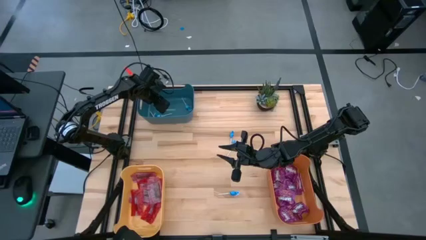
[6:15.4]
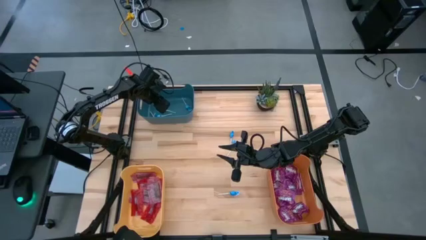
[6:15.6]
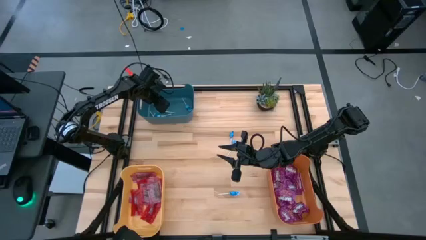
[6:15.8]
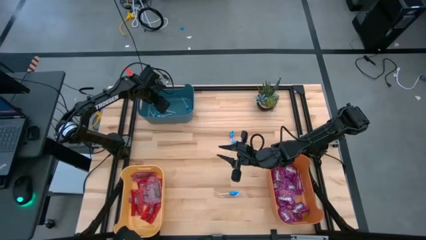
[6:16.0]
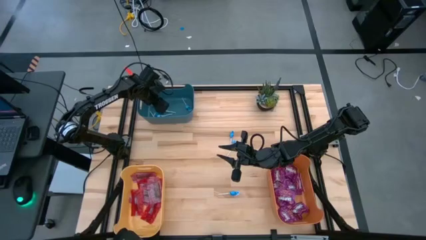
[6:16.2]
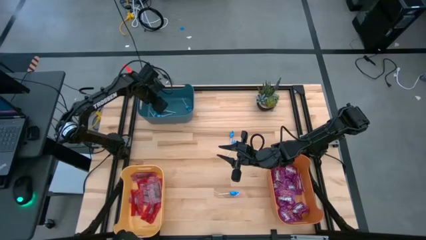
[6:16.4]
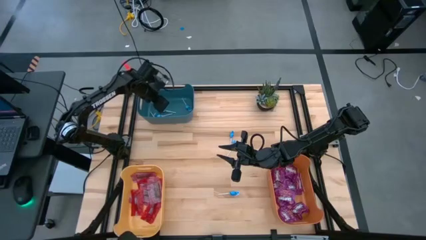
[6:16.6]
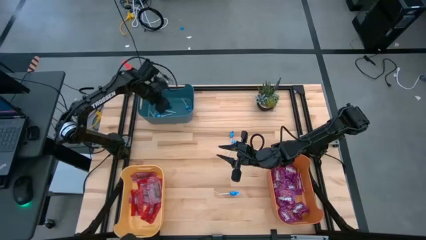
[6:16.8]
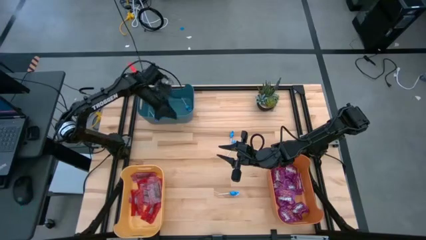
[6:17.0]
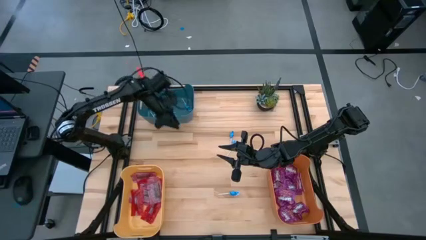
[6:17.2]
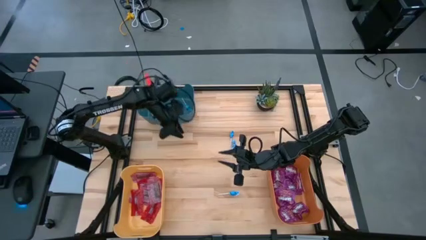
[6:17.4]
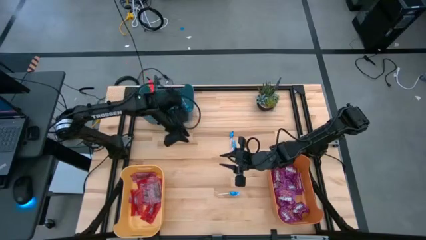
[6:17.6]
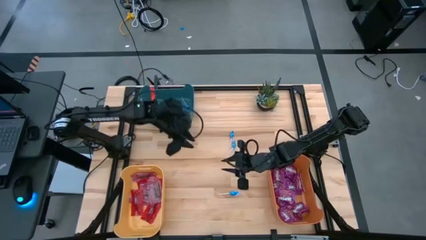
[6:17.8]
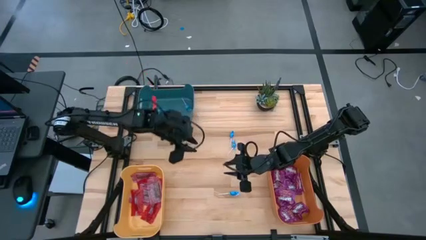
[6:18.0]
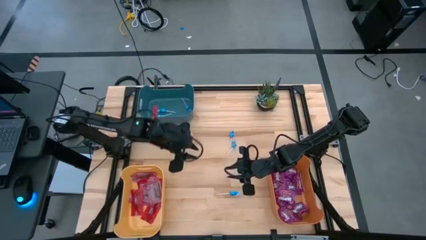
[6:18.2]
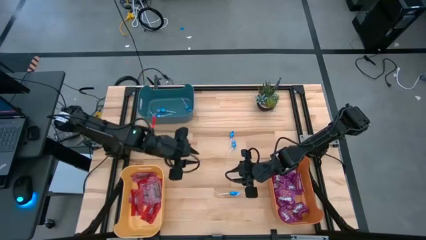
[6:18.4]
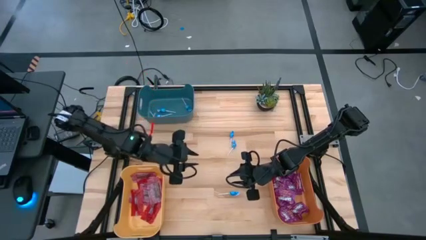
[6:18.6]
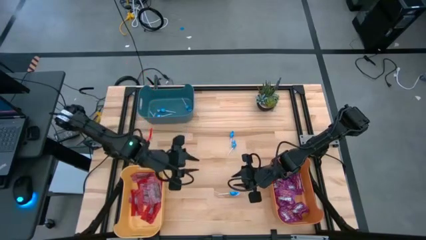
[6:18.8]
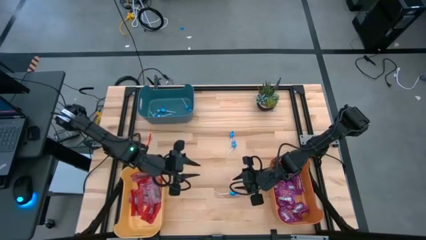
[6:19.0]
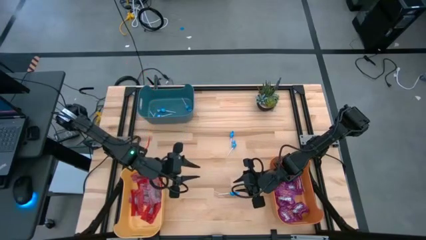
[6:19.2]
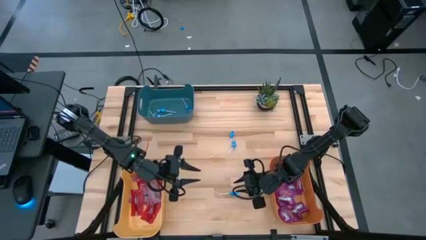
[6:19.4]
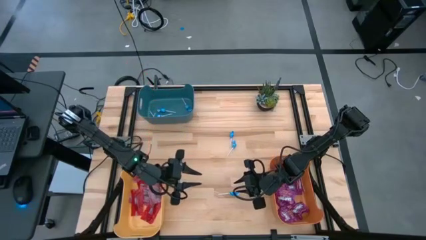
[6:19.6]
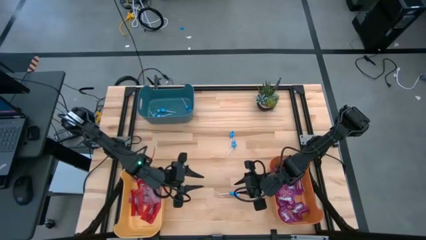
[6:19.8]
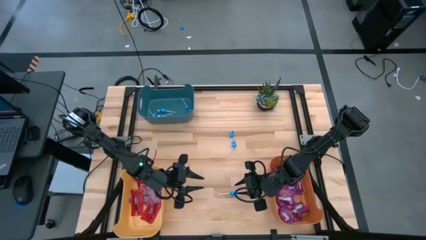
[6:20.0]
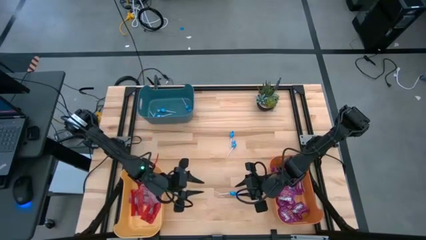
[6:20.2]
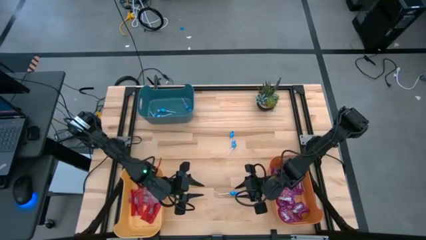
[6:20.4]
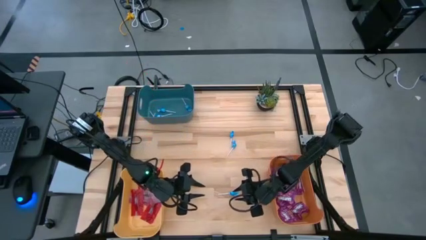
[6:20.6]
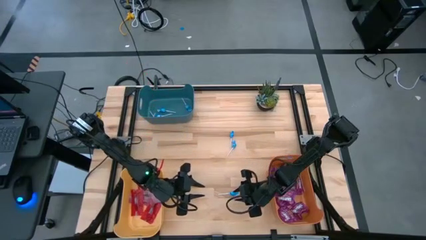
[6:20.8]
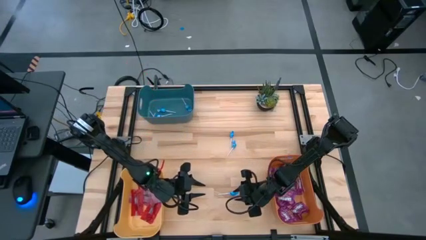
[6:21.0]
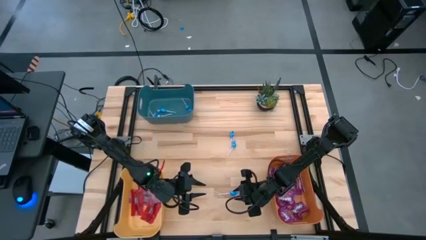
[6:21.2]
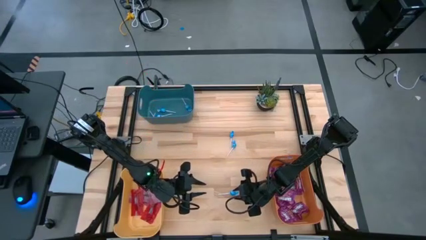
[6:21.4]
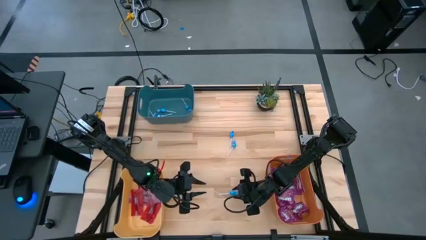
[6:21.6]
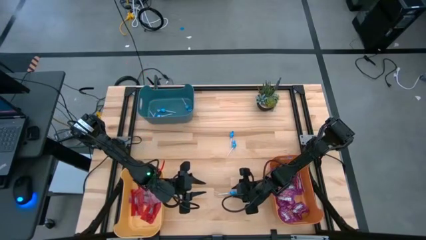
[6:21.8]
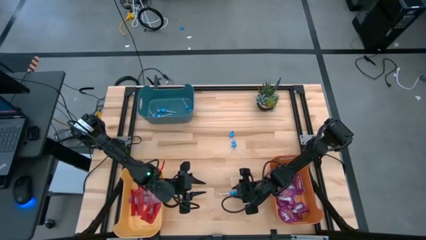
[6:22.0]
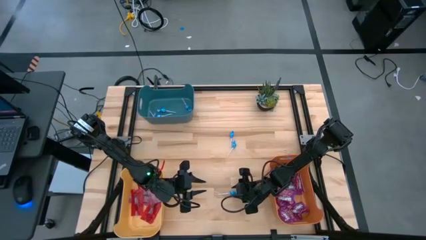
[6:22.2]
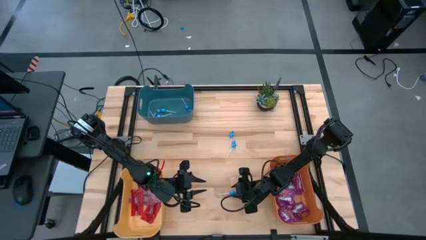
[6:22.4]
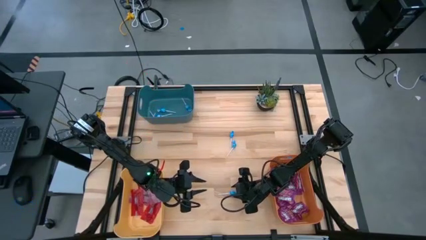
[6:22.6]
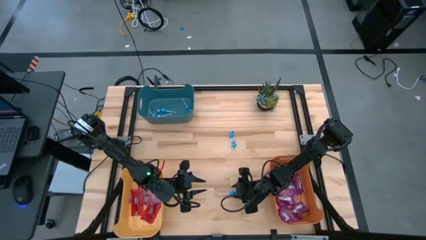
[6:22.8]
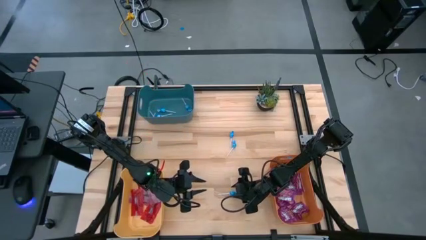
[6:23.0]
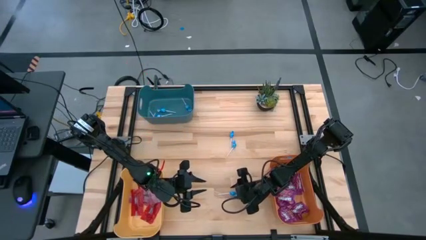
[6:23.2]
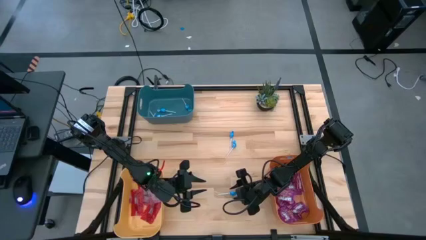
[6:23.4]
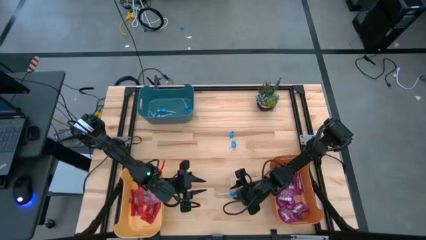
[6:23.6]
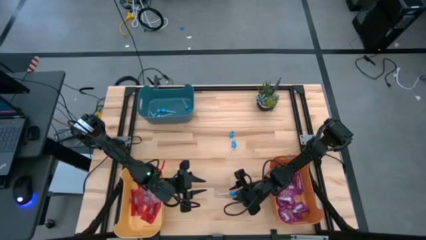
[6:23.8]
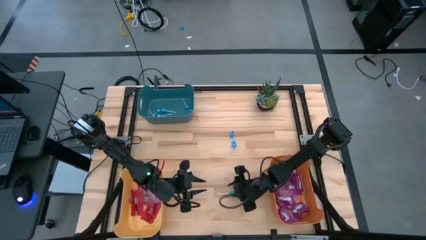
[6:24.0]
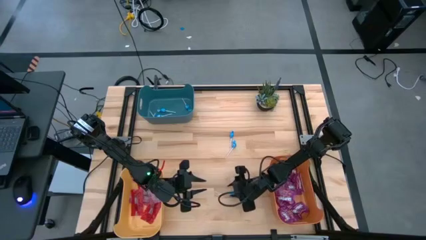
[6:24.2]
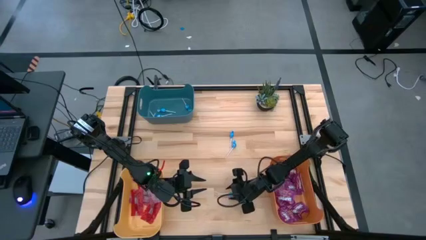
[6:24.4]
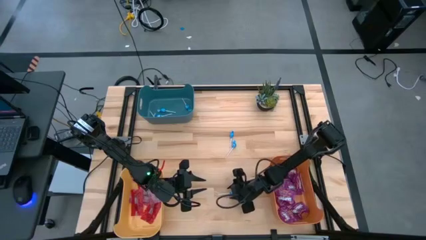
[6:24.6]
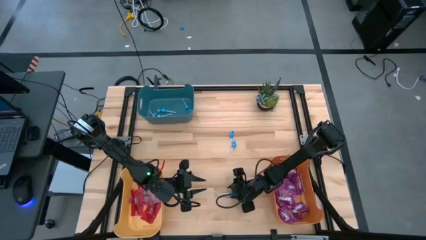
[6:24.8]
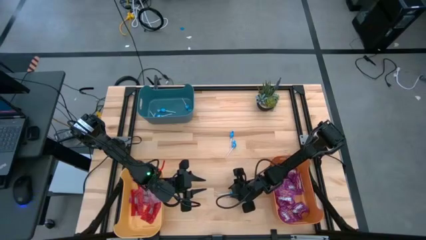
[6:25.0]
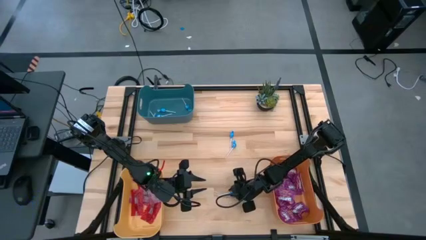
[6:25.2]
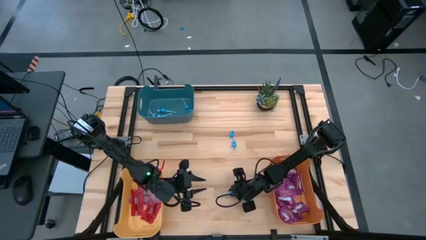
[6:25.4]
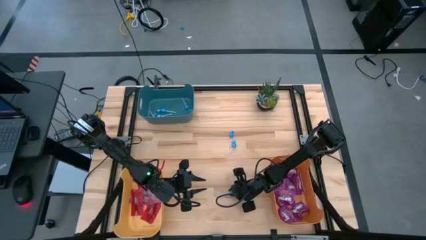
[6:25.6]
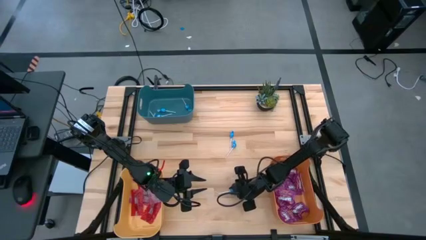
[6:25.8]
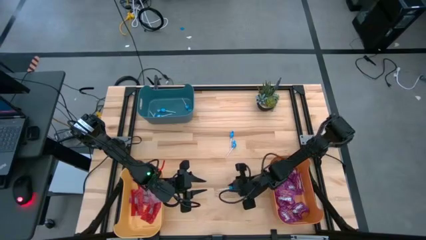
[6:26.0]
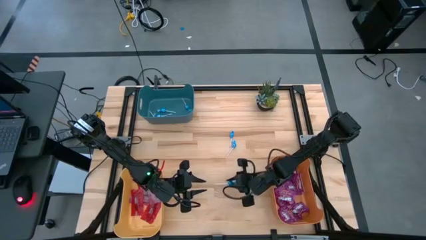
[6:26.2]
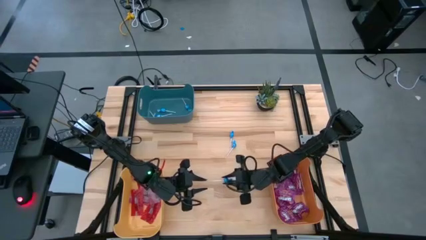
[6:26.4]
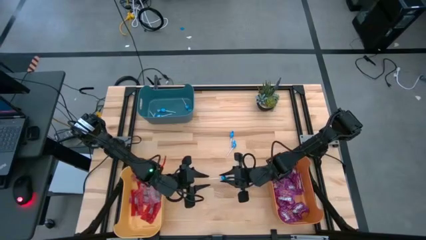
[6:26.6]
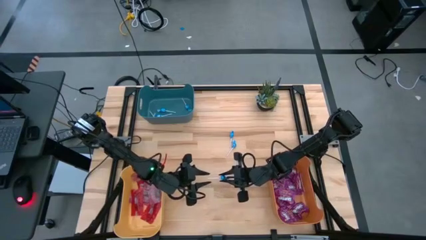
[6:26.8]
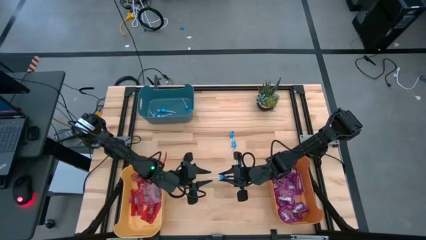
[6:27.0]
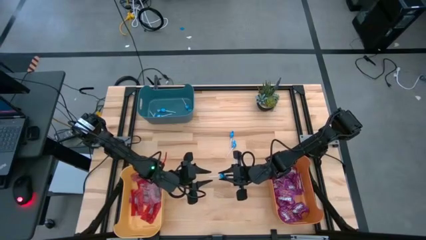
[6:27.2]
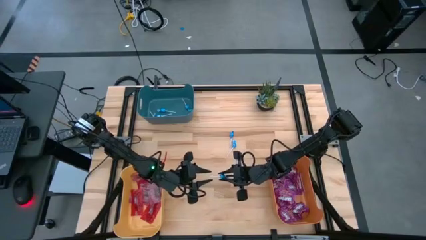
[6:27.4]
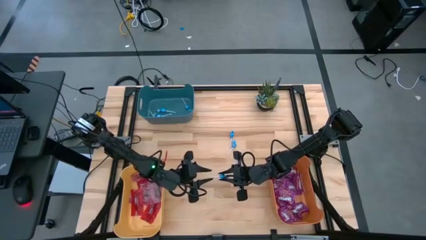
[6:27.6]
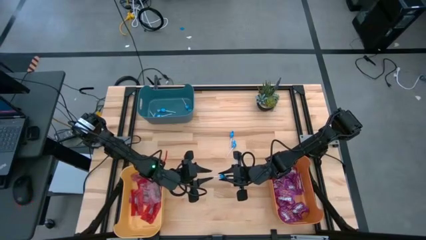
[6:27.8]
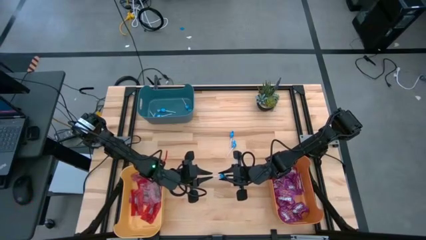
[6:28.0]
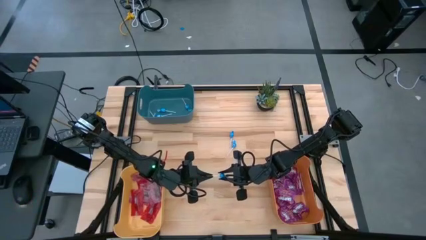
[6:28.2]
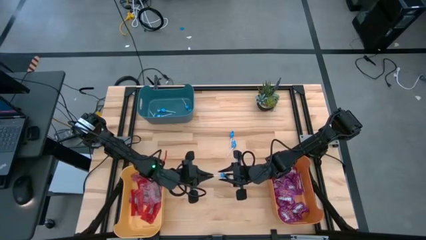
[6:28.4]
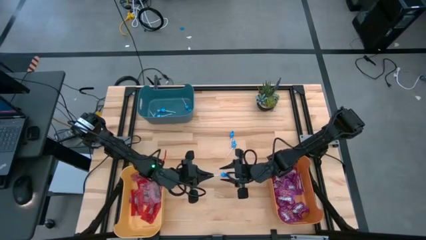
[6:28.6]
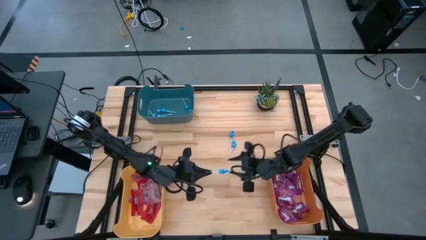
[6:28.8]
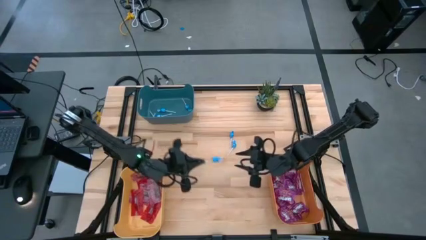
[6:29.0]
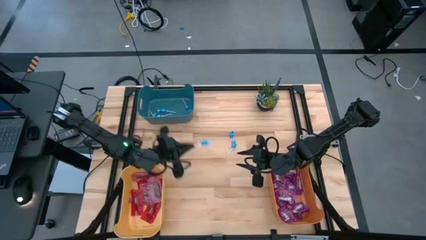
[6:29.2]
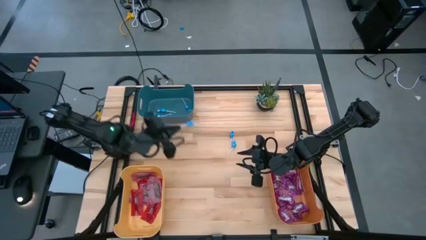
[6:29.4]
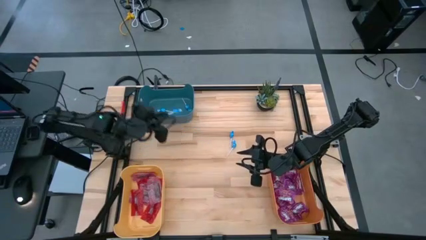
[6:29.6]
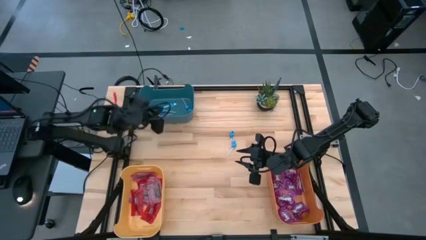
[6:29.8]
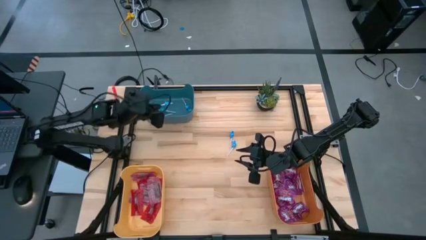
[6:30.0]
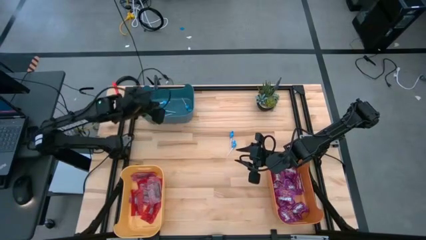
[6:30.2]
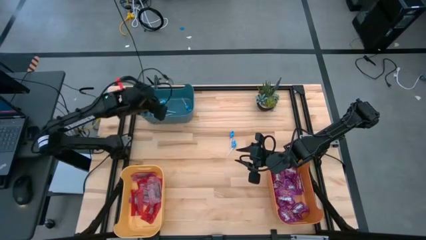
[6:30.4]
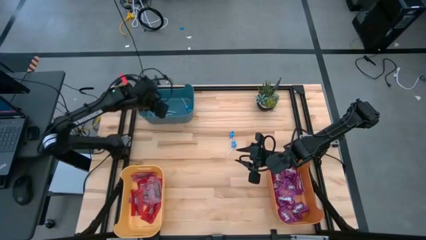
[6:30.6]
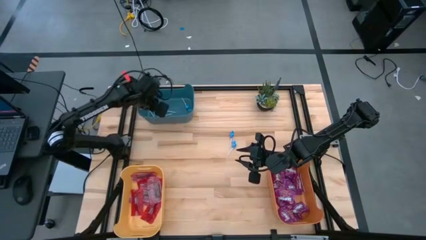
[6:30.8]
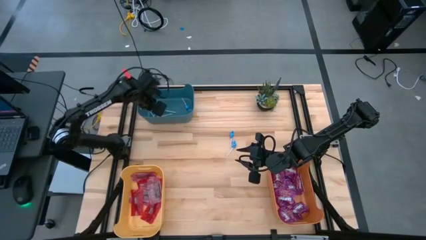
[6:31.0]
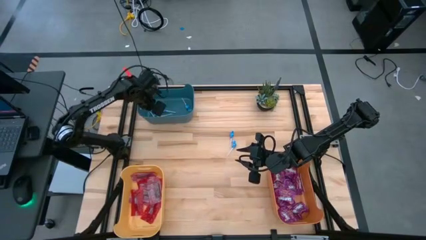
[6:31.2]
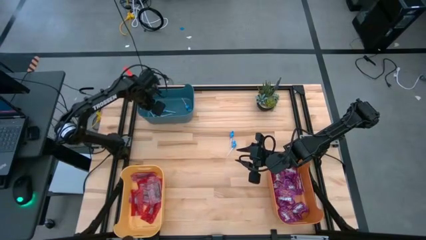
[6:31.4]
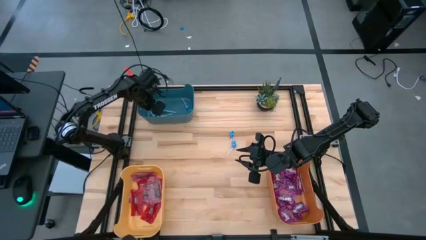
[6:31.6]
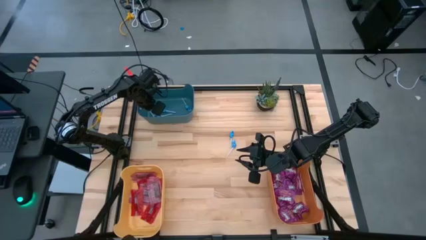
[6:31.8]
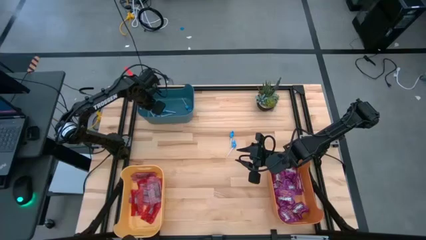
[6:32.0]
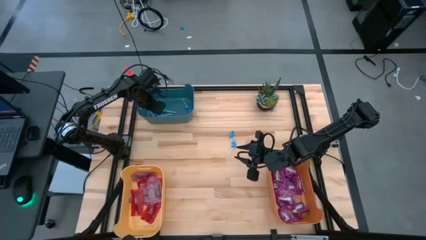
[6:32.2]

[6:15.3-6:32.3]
Task: Sort candy
Put the blue candy into the blue bin
